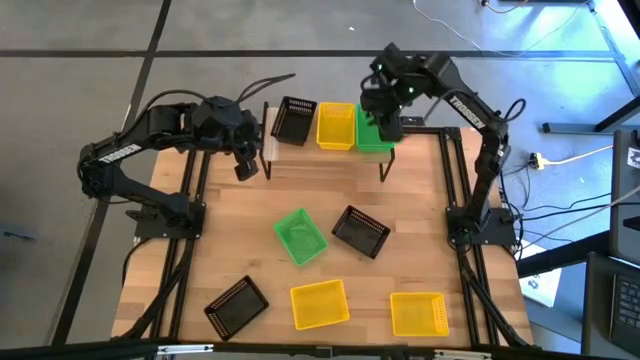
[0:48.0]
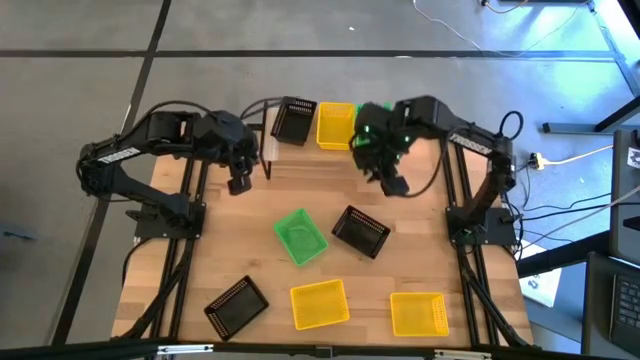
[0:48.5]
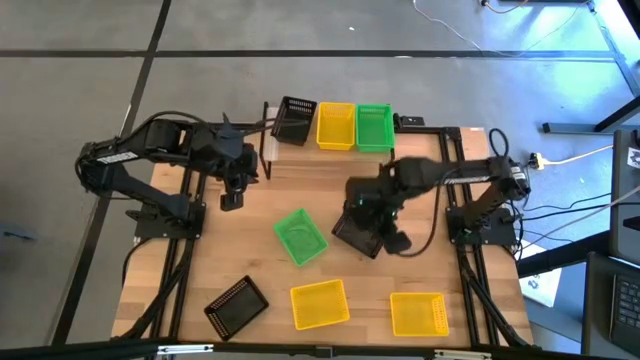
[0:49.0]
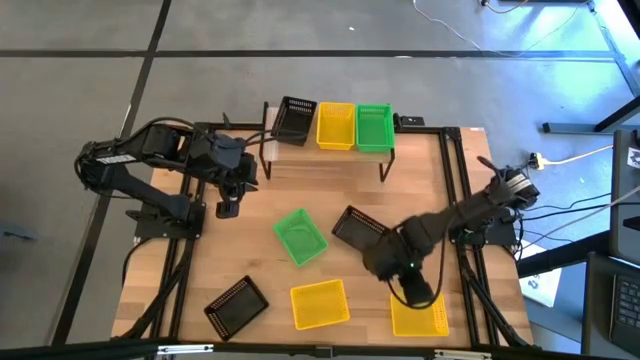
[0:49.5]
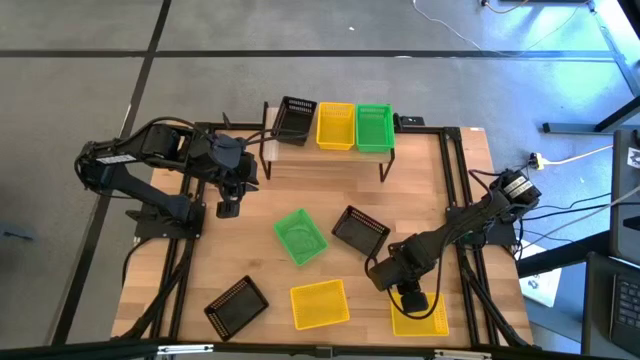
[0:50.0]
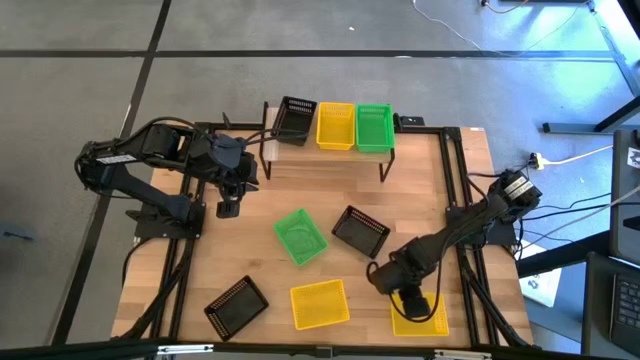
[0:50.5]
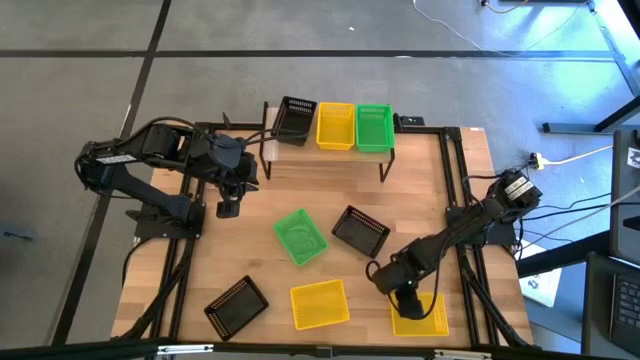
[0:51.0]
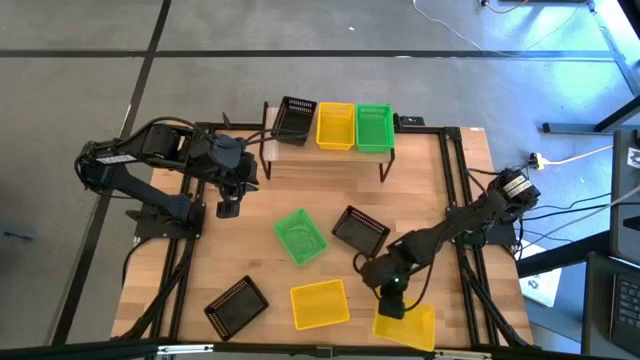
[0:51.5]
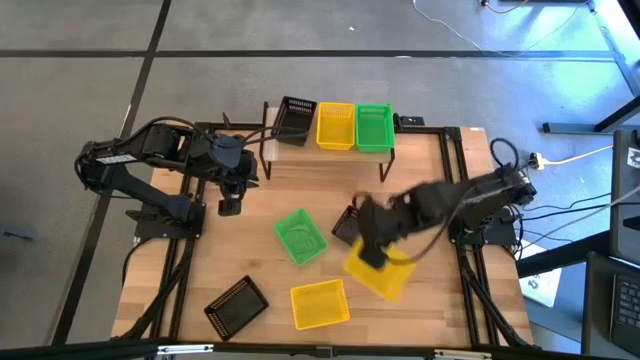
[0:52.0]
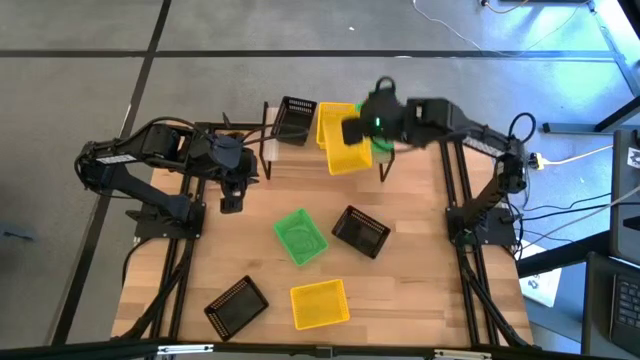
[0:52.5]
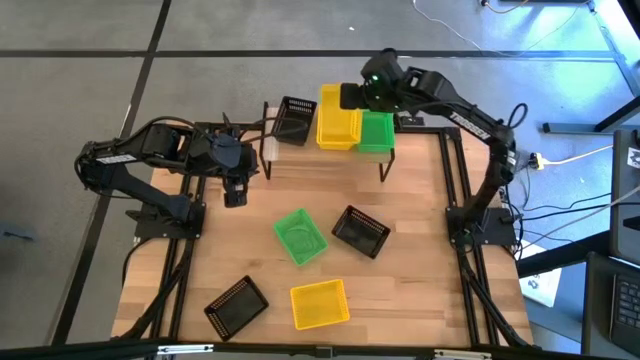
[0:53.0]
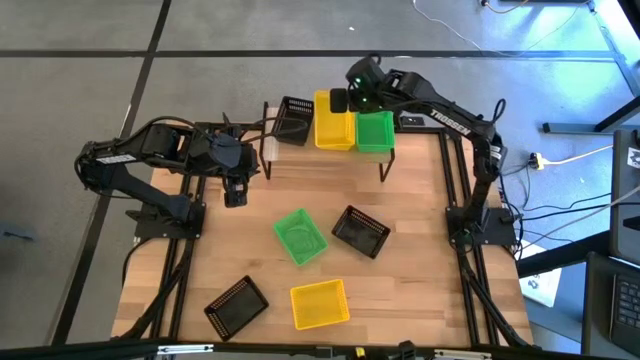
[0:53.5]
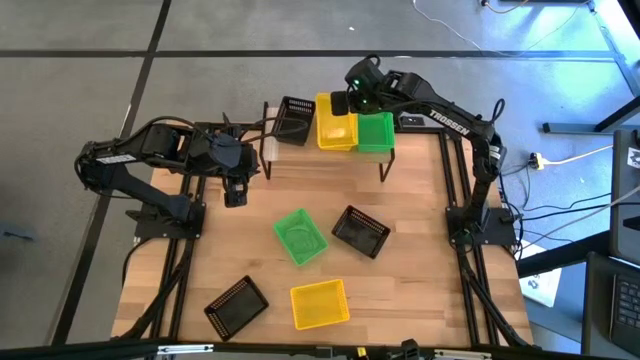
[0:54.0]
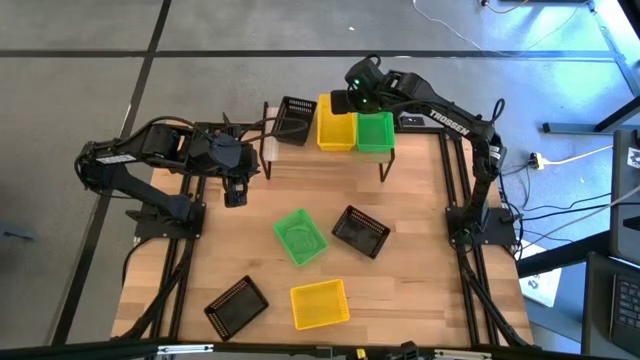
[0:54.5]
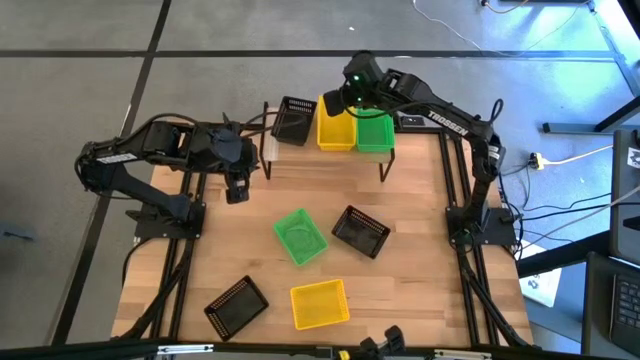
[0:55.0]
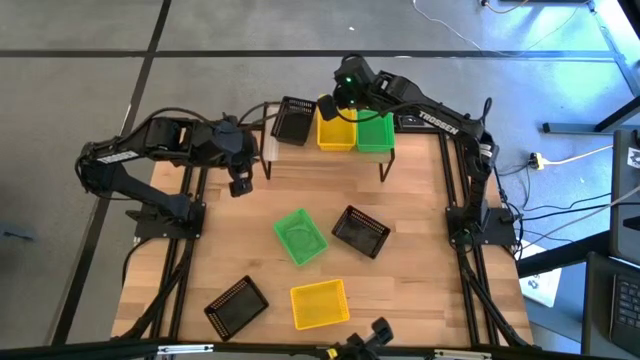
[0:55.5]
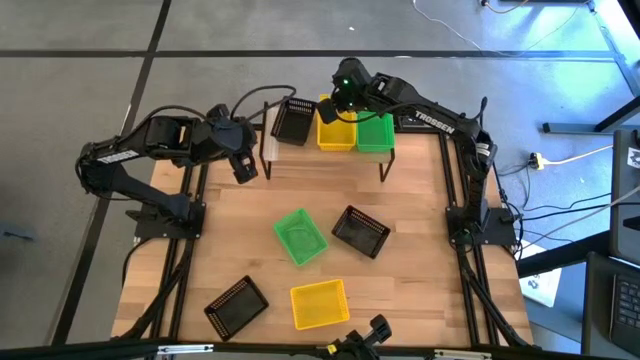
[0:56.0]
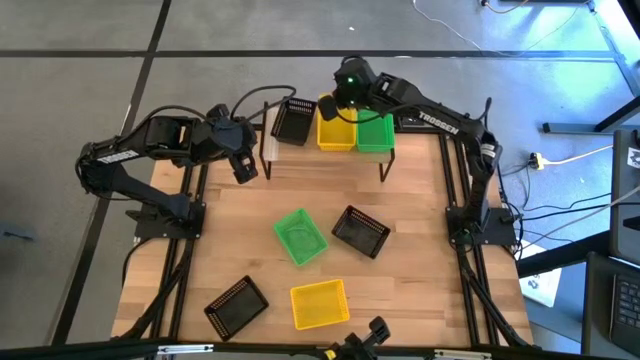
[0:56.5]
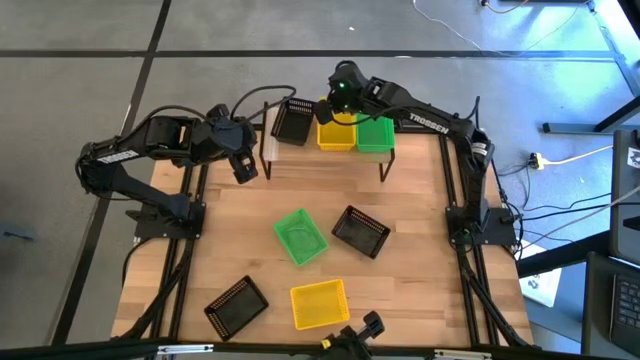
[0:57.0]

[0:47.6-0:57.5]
Task: Stack baskets on shelf by color
Stack the right yellow bin on top of the other yellow bin on the shelf

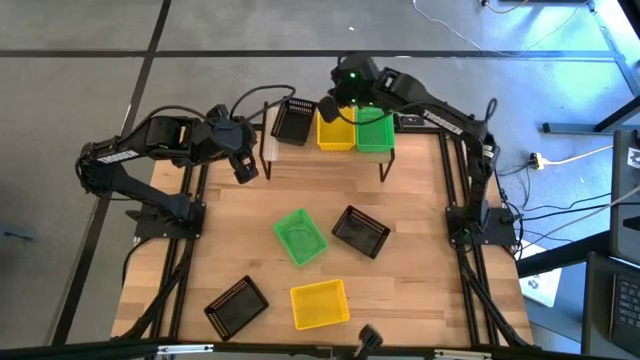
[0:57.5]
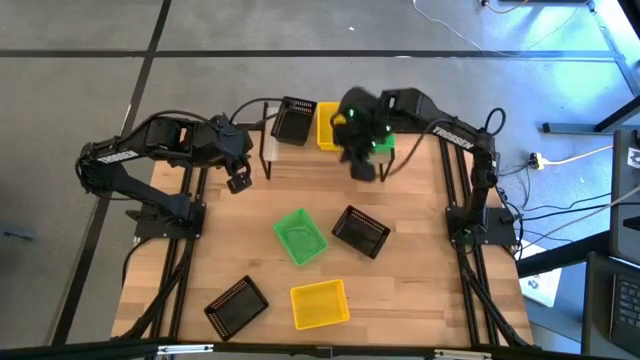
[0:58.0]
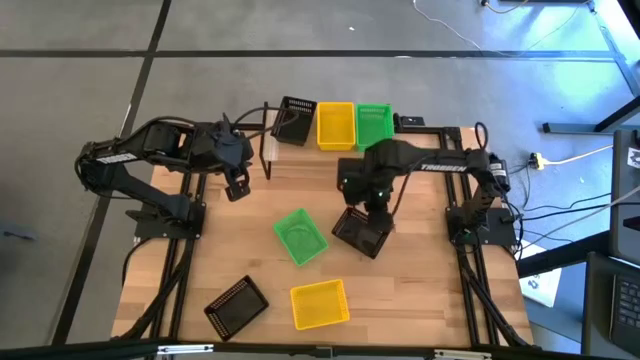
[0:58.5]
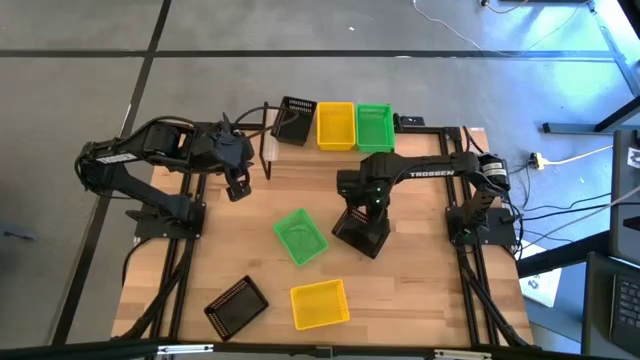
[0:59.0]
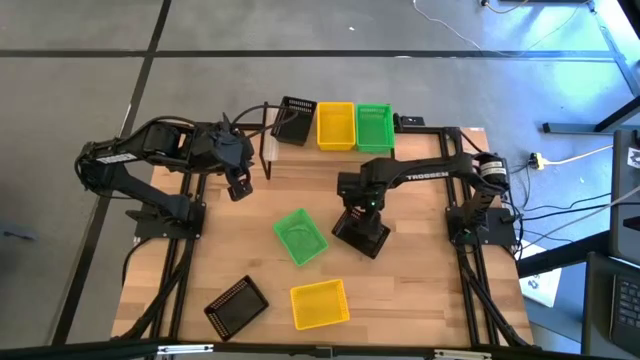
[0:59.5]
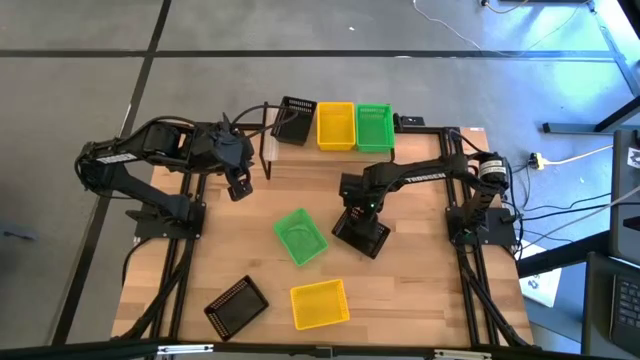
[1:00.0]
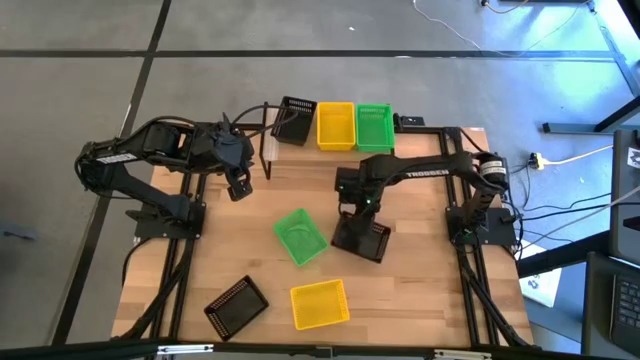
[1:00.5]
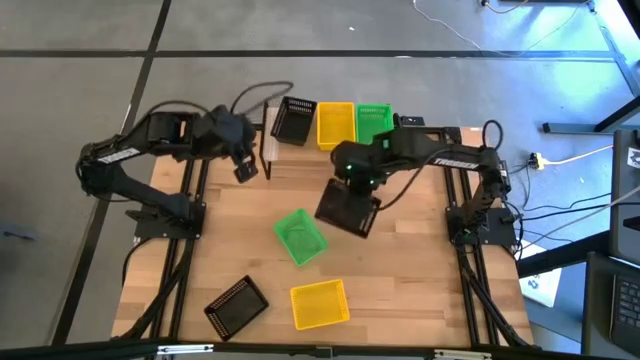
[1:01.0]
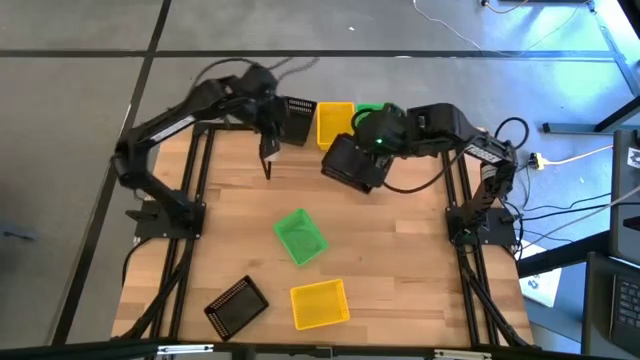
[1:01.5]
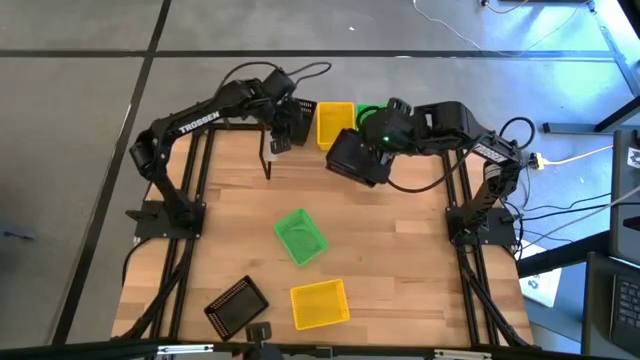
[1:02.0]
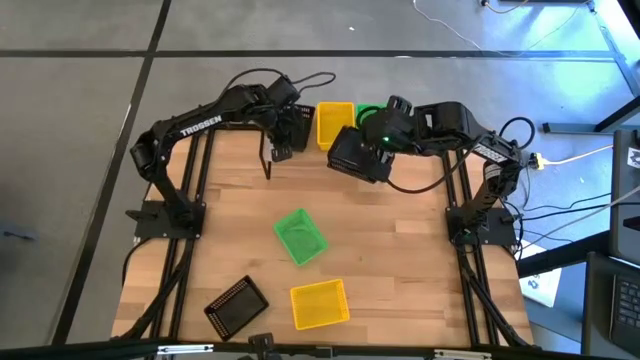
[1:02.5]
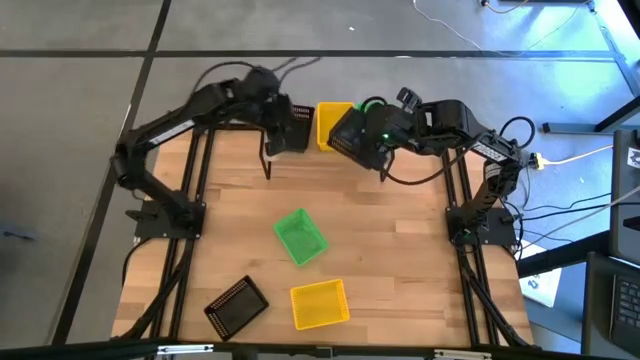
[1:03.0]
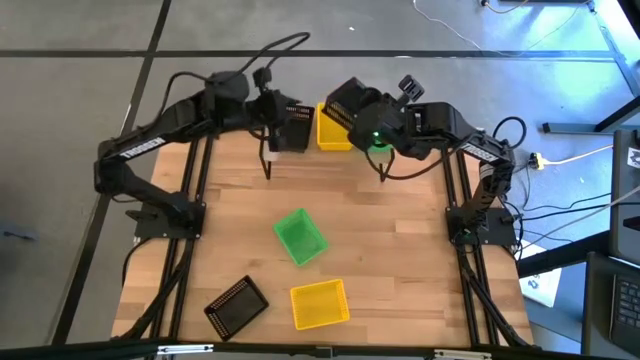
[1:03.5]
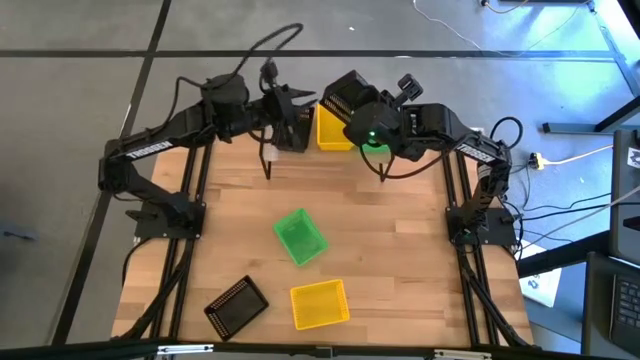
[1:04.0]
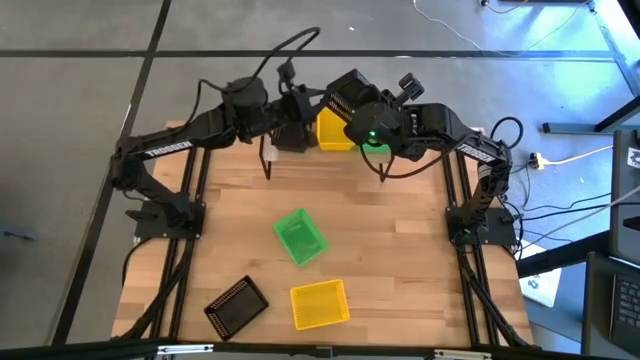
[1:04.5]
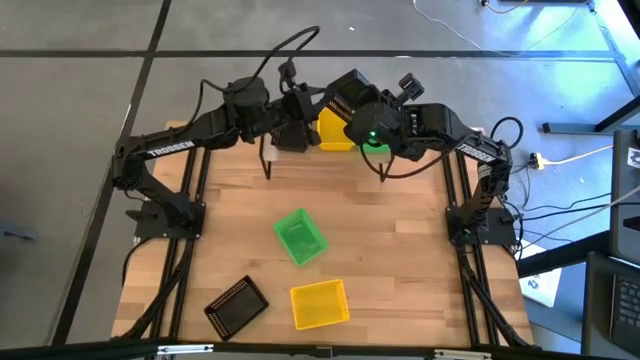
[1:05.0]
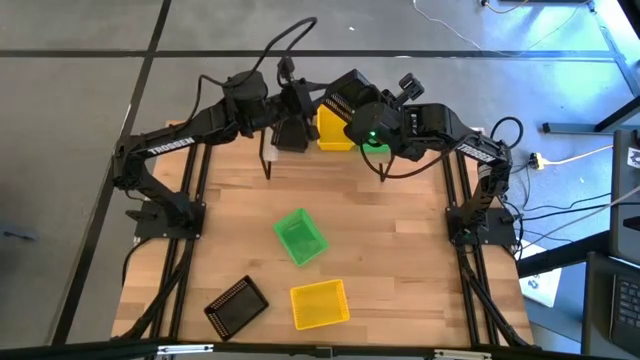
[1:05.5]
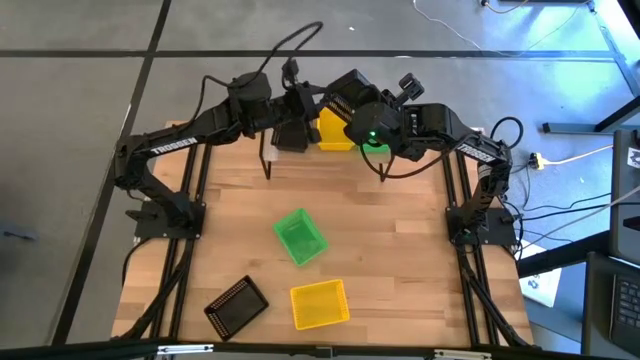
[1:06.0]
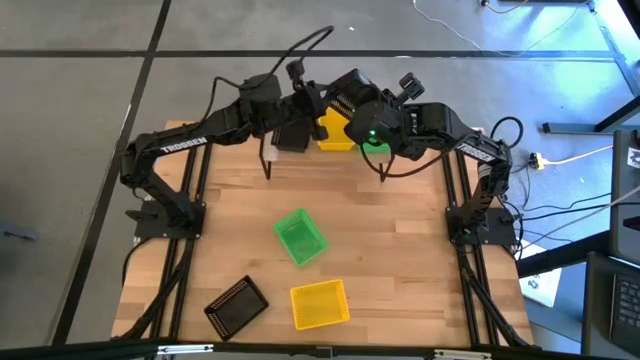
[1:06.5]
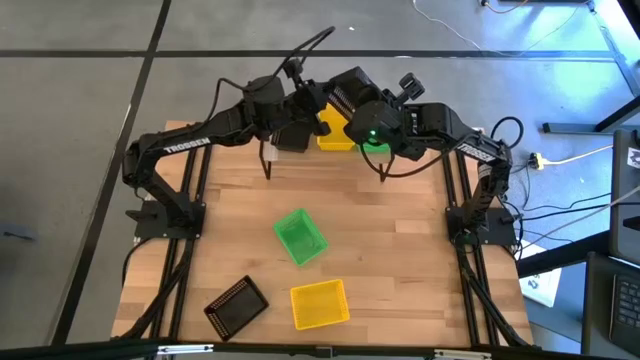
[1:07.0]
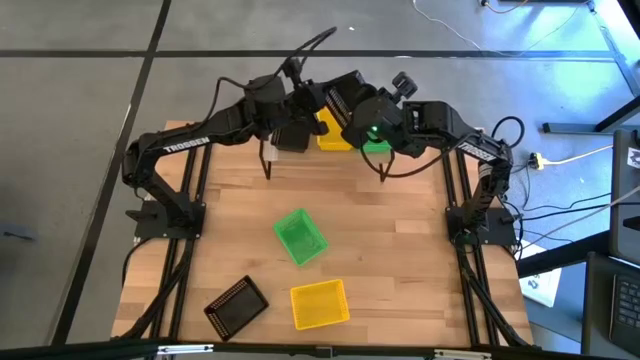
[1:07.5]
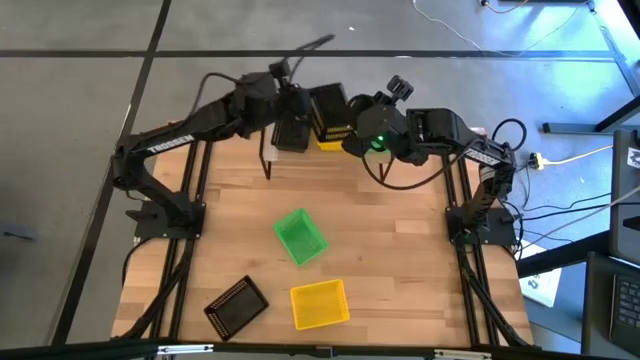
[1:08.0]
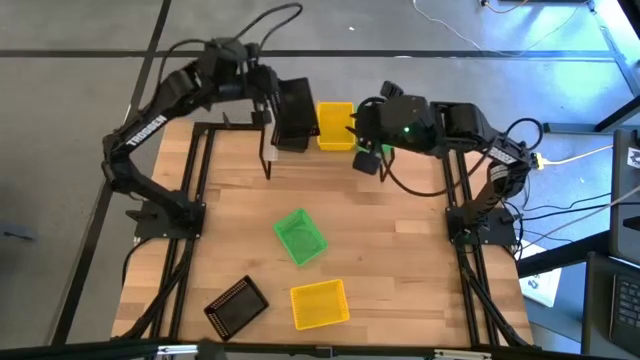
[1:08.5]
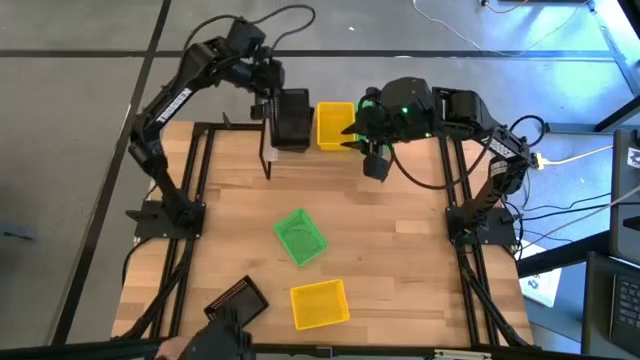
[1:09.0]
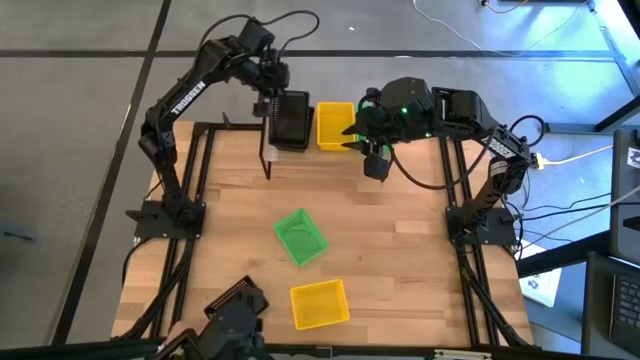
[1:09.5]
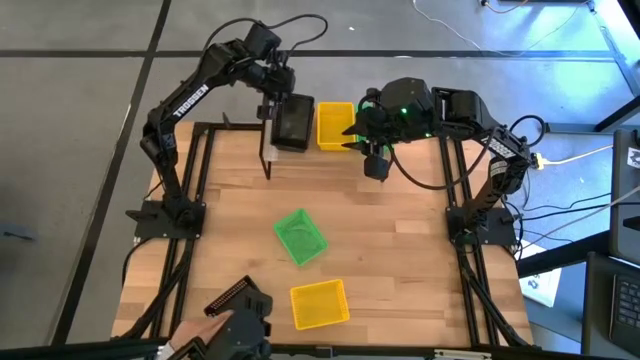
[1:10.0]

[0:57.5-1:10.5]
Stack the top black bin on top of the other black bin on the shelf
